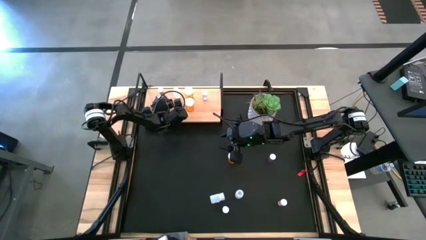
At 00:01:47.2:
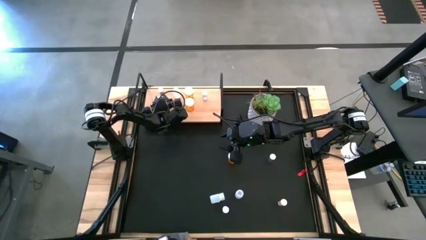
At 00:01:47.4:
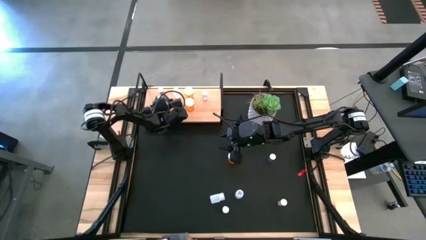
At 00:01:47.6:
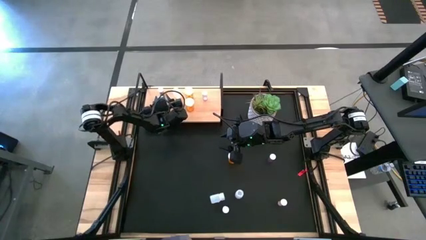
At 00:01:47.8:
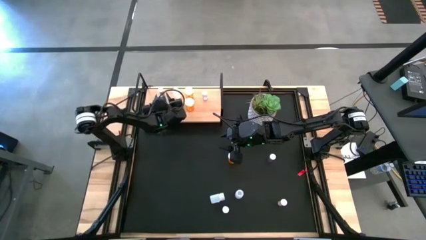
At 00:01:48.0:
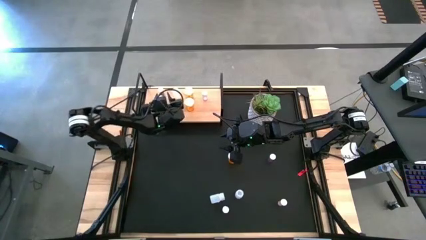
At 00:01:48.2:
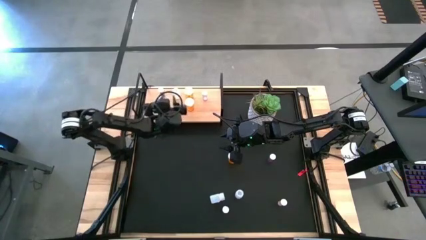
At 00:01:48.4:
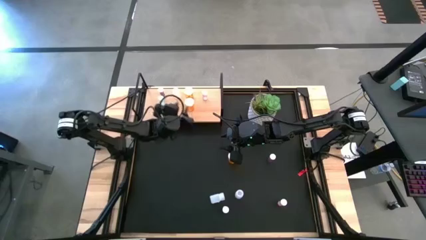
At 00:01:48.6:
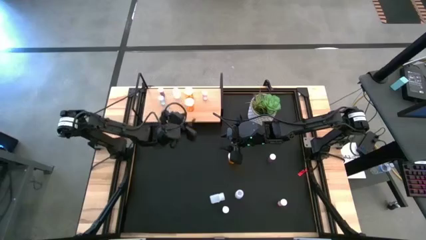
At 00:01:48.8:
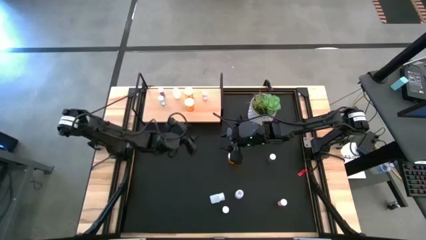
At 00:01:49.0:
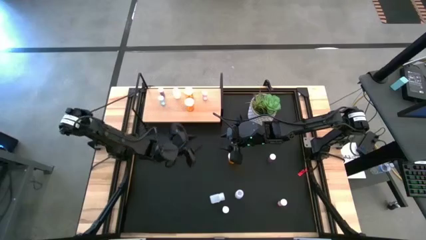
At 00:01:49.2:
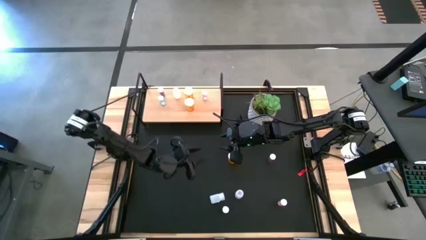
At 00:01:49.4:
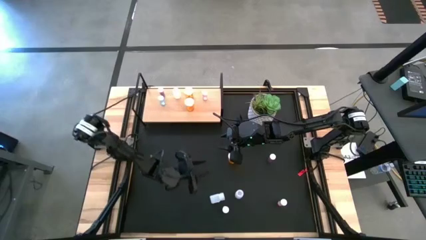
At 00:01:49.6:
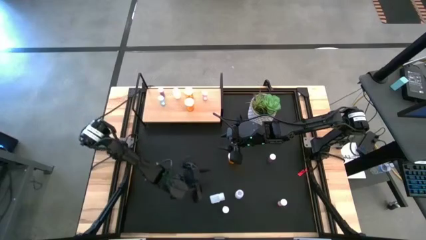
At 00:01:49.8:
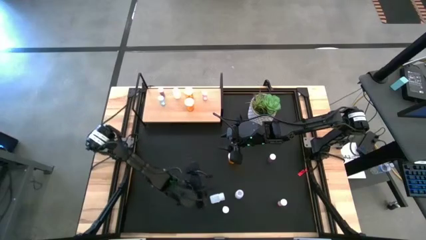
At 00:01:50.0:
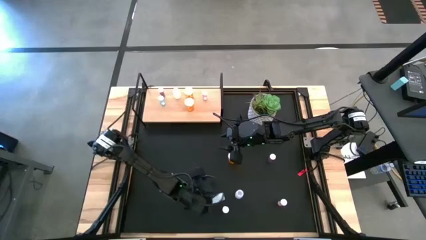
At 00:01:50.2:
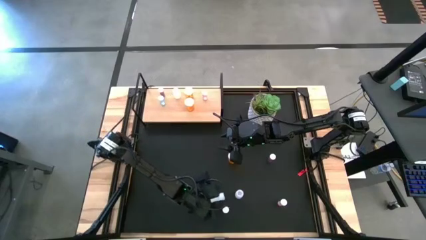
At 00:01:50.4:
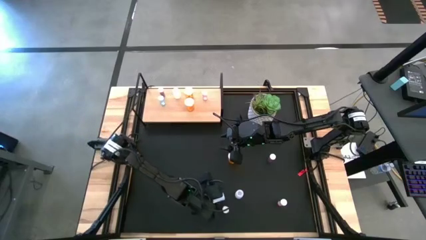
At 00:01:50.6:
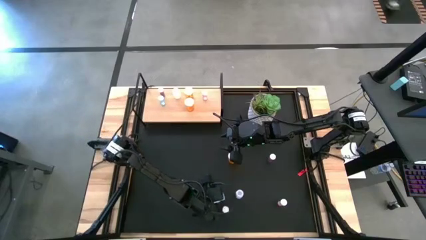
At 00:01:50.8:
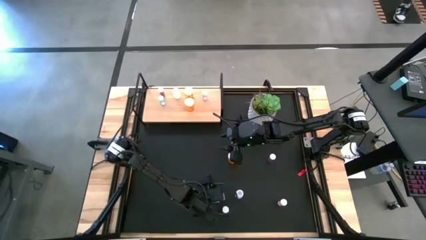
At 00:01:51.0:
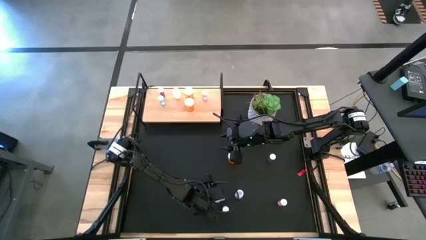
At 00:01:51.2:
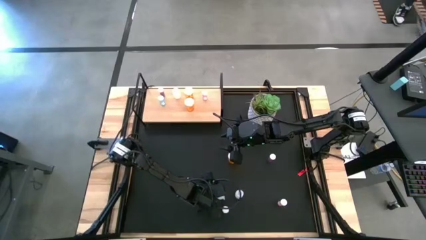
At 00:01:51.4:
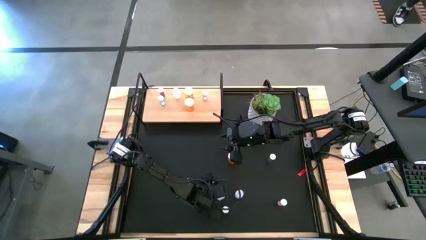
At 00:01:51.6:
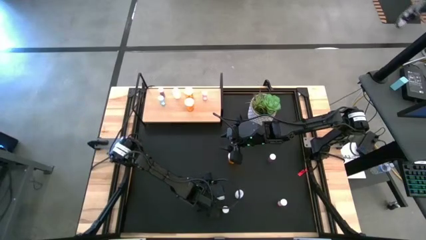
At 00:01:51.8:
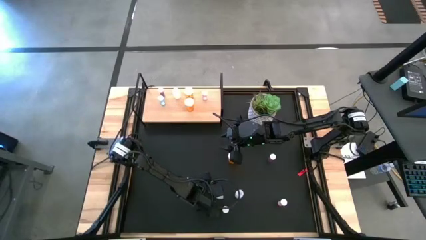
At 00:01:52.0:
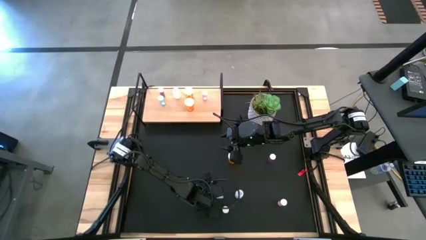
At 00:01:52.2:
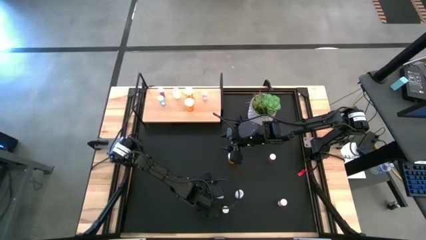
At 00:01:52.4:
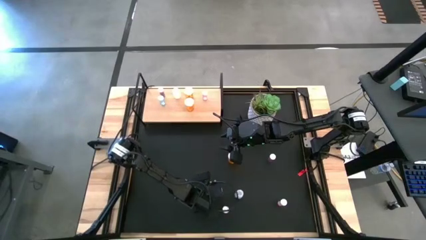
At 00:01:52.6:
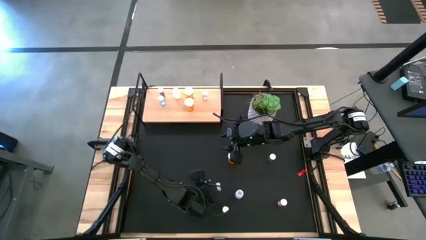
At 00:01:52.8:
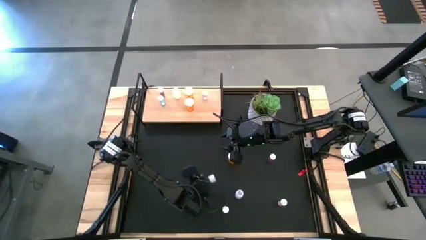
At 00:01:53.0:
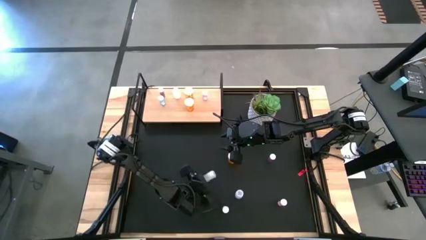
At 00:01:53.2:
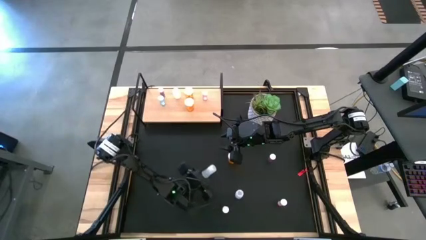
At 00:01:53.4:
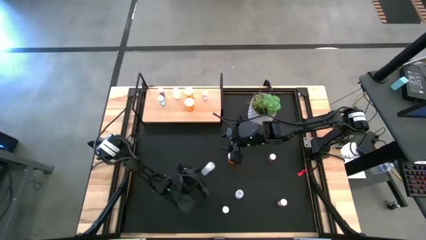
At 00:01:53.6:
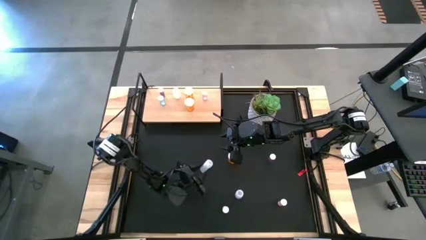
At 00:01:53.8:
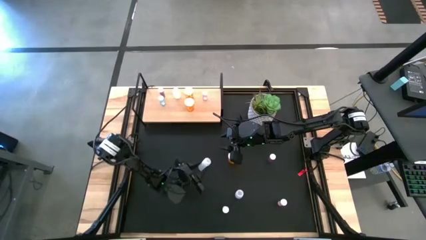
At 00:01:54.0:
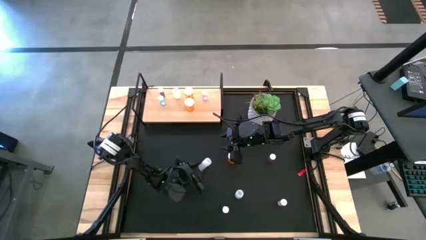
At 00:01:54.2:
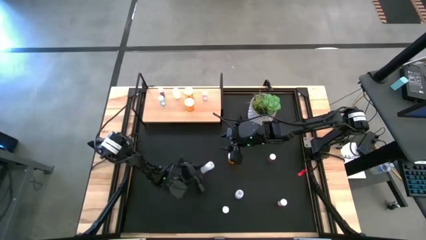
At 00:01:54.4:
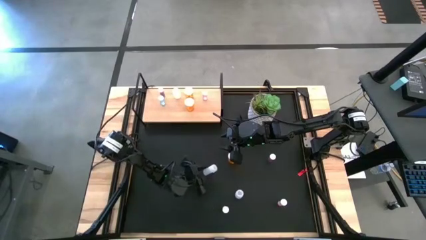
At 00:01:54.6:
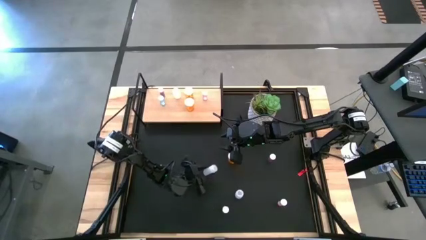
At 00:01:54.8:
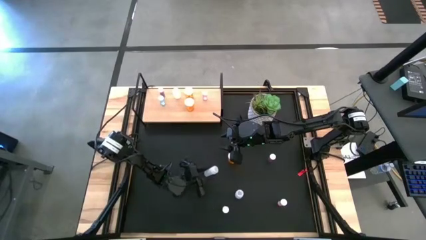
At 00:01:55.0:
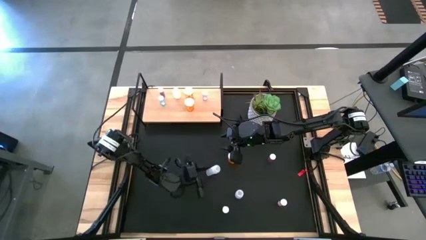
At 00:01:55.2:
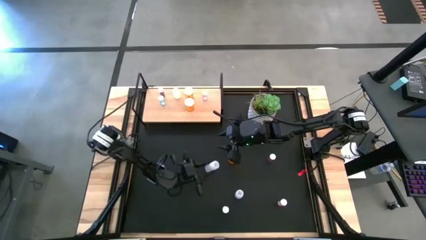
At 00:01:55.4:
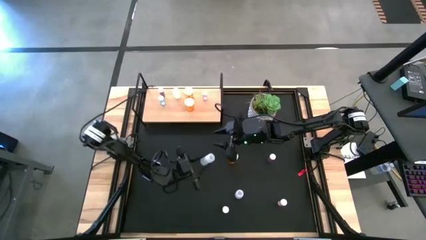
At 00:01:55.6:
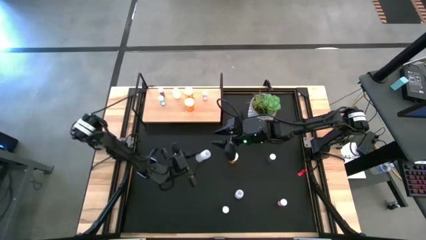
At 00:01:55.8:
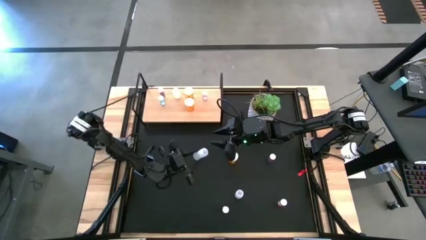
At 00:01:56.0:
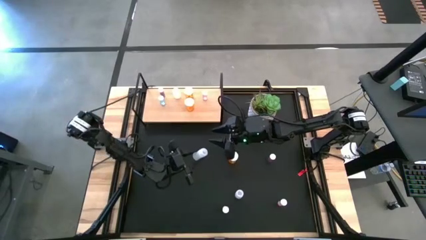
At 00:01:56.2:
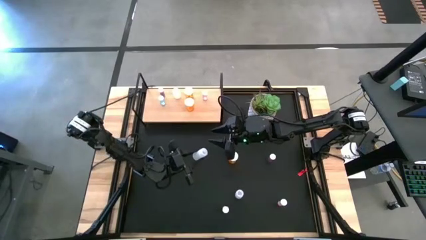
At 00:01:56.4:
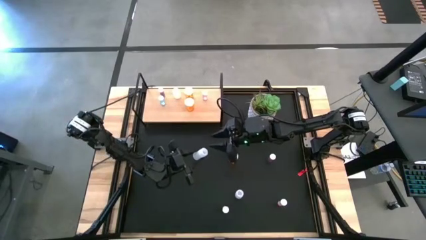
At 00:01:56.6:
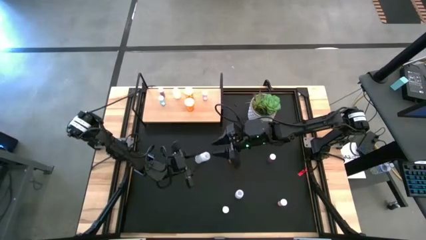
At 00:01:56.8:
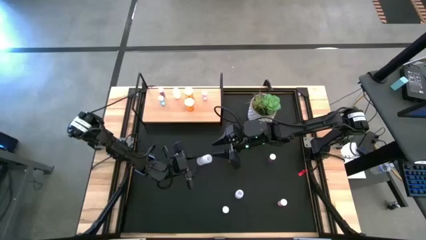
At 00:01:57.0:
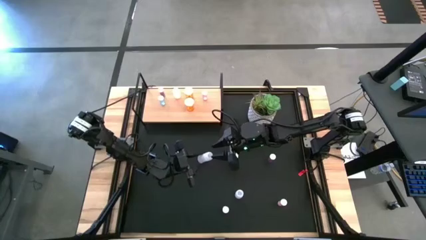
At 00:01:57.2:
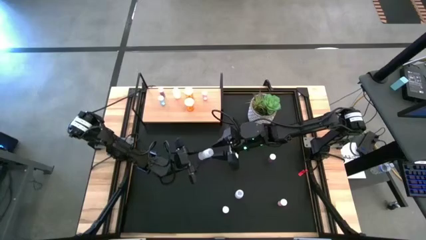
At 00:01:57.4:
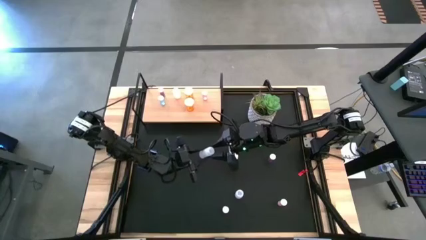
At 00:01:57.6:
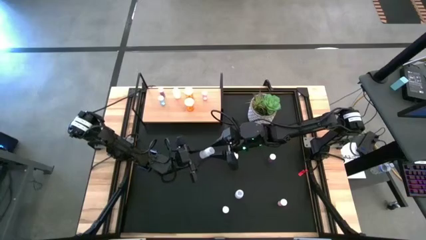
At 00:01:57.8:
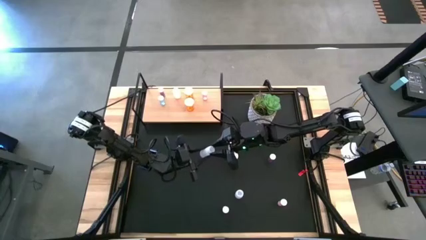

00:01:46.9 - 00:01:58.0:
Task: Pick and place medicine bottles onto shelf by color
Put the bottom left white pill bottle on the shelf aligned with the other white pill bottle
